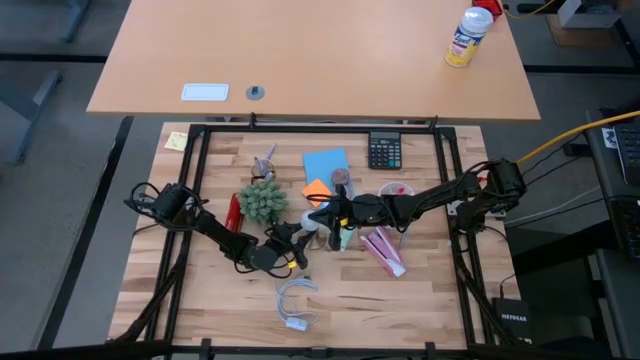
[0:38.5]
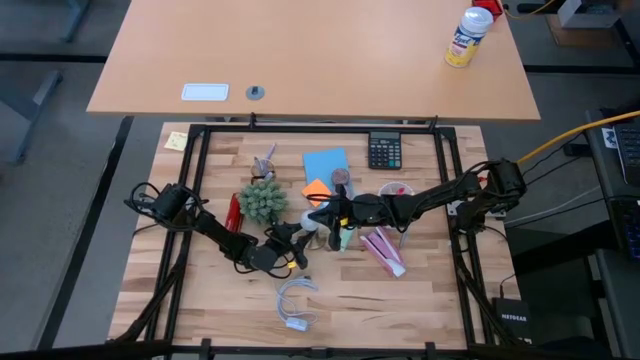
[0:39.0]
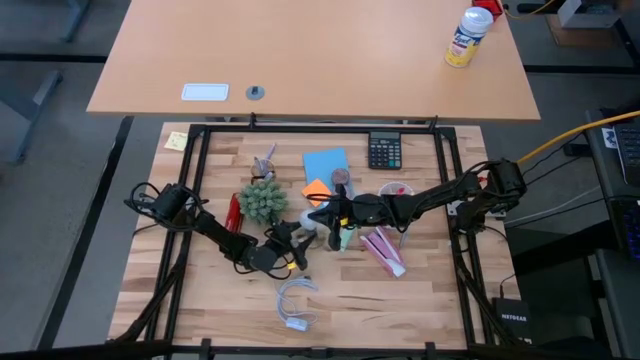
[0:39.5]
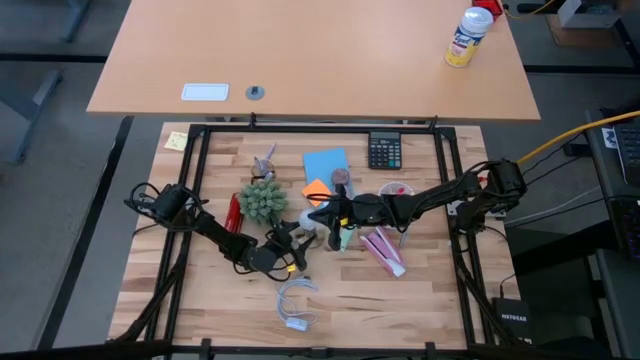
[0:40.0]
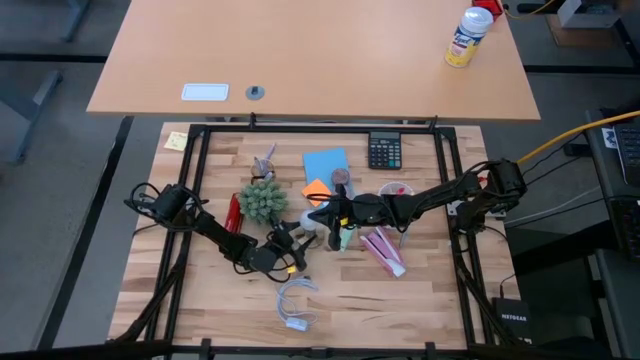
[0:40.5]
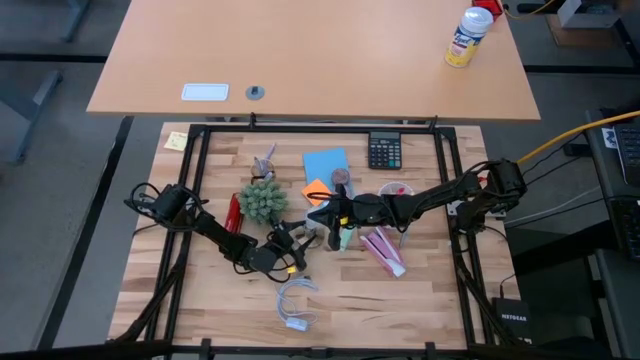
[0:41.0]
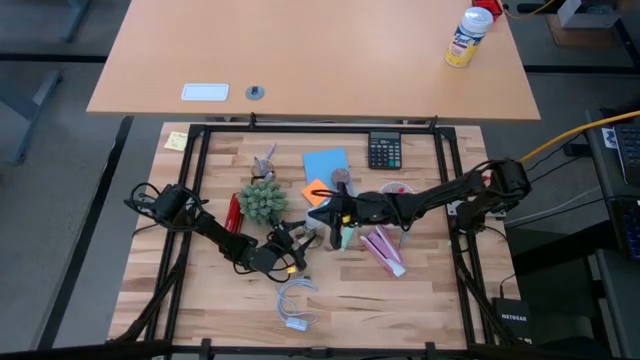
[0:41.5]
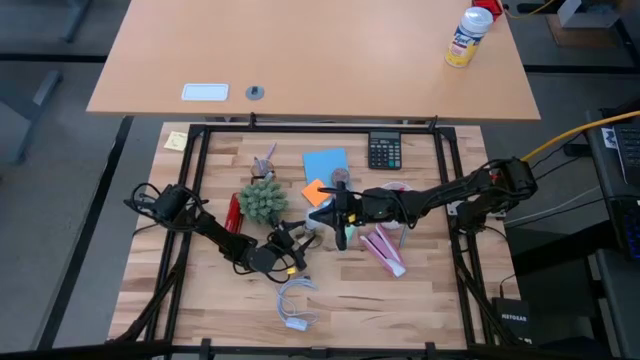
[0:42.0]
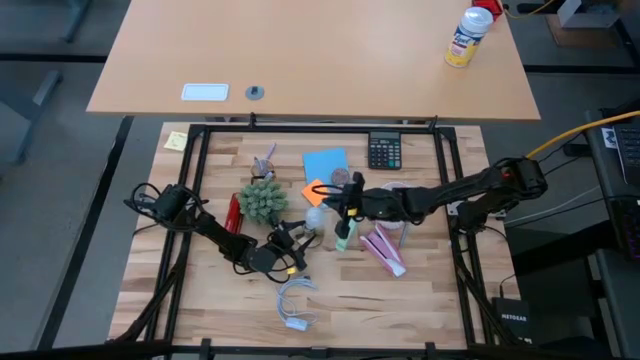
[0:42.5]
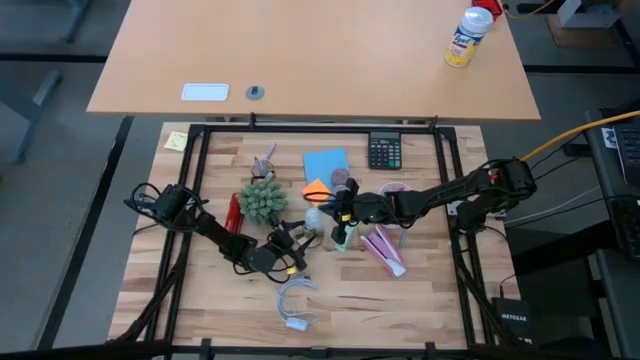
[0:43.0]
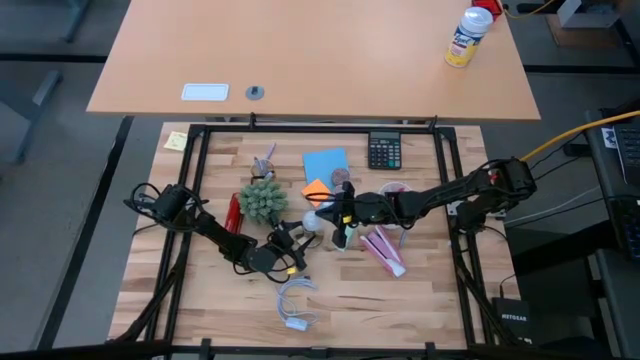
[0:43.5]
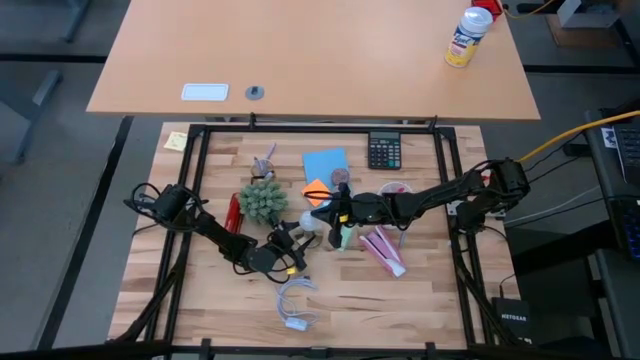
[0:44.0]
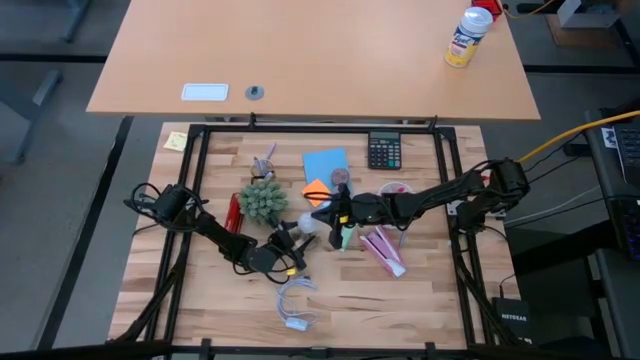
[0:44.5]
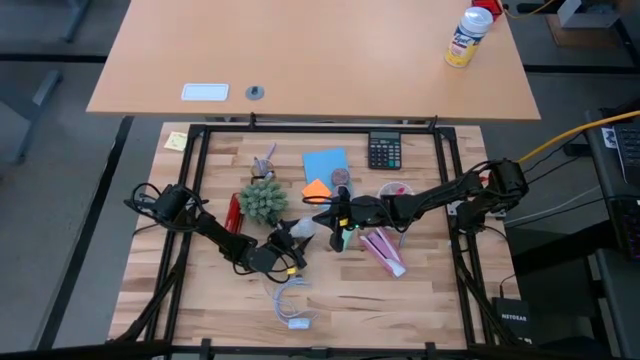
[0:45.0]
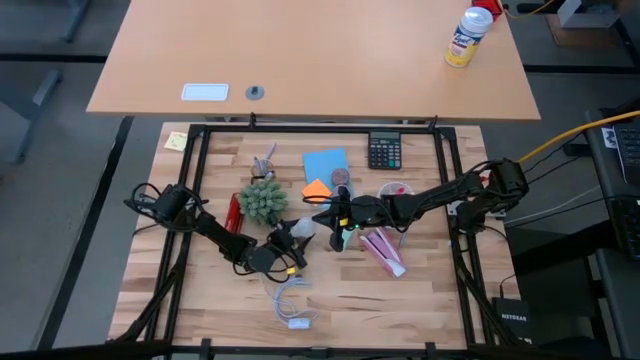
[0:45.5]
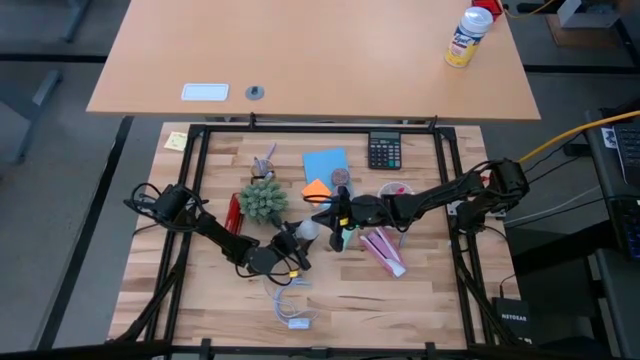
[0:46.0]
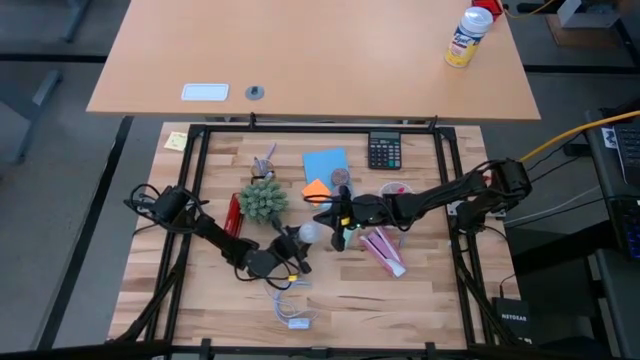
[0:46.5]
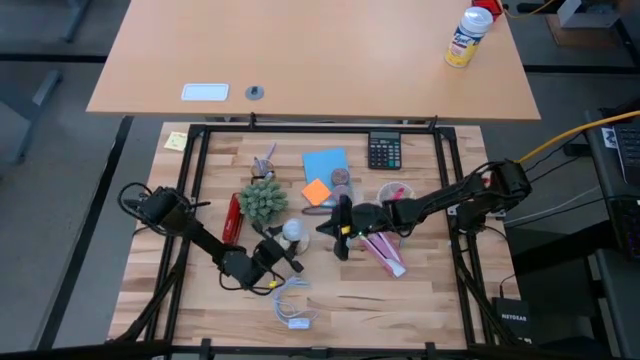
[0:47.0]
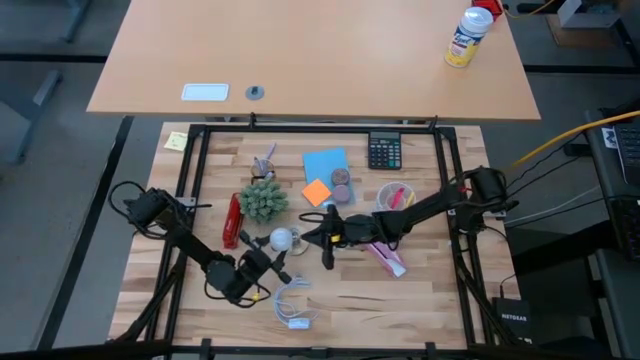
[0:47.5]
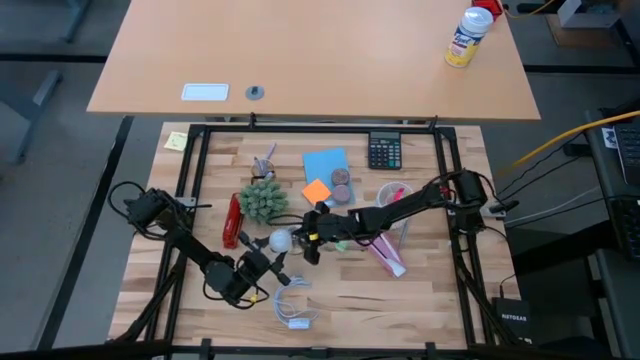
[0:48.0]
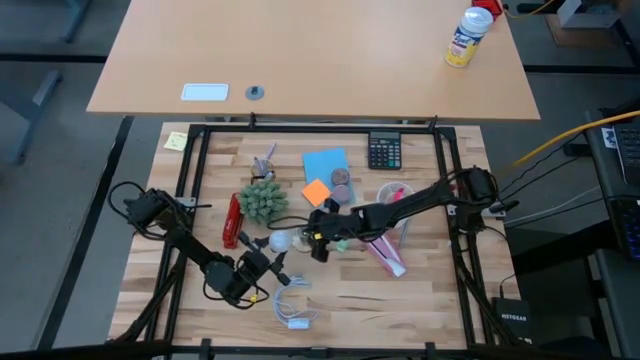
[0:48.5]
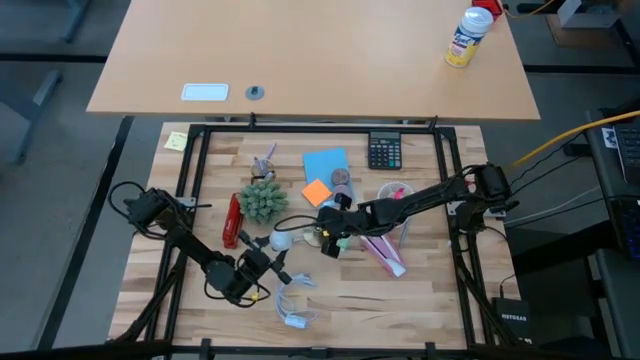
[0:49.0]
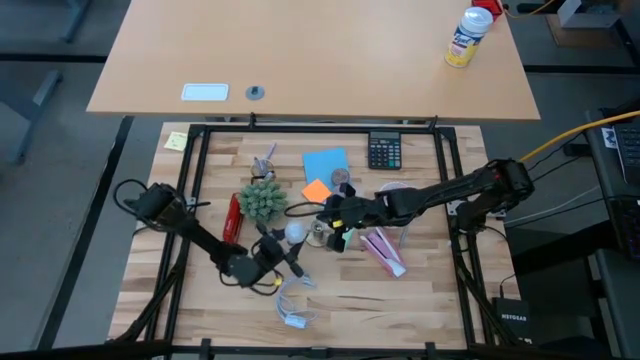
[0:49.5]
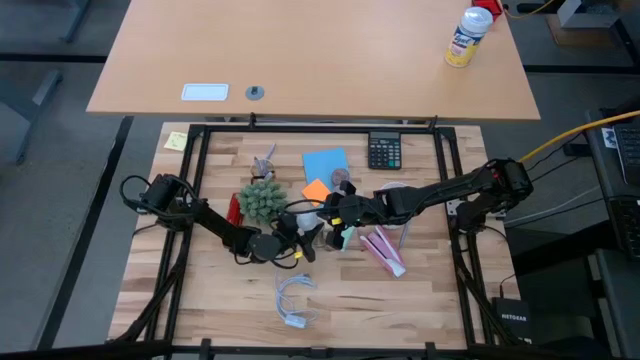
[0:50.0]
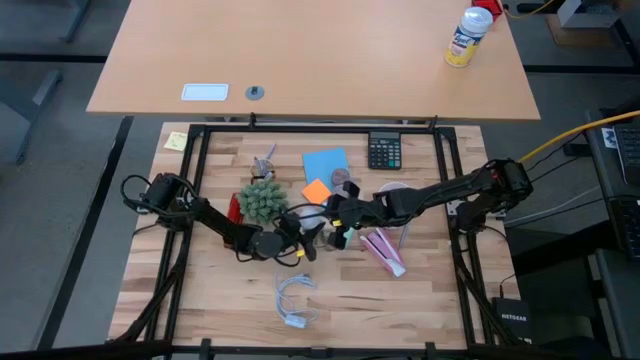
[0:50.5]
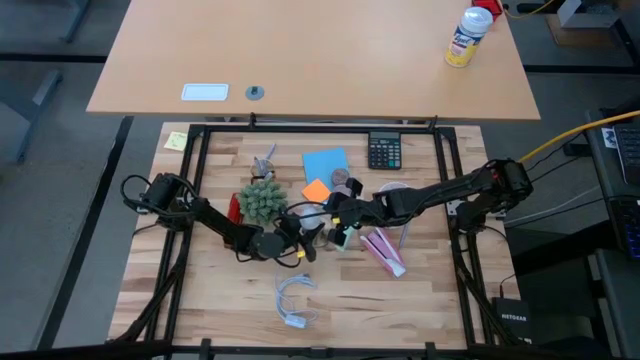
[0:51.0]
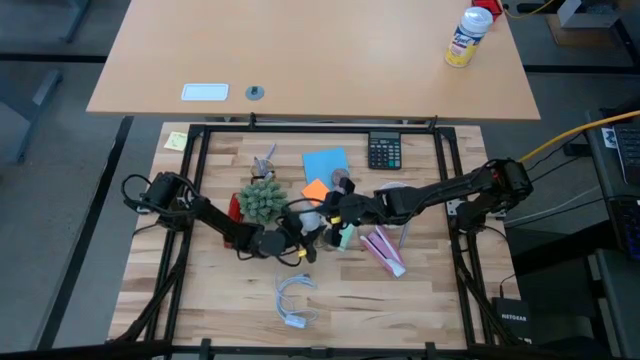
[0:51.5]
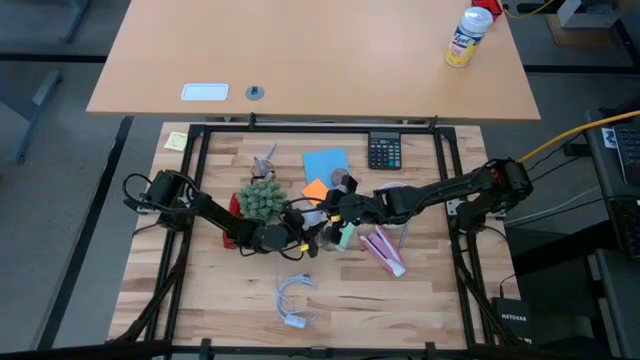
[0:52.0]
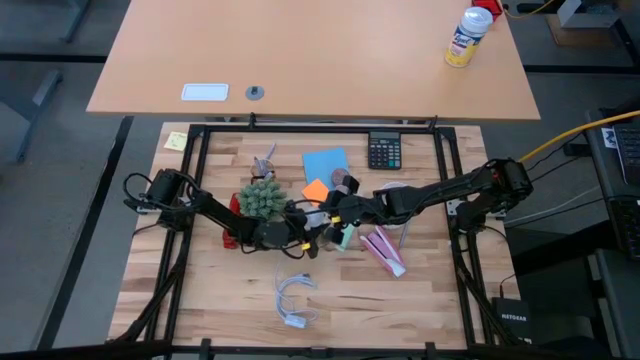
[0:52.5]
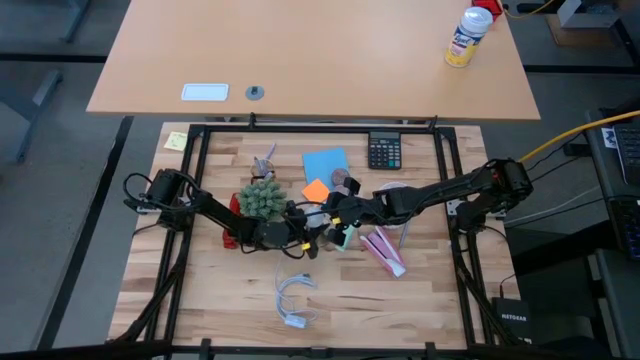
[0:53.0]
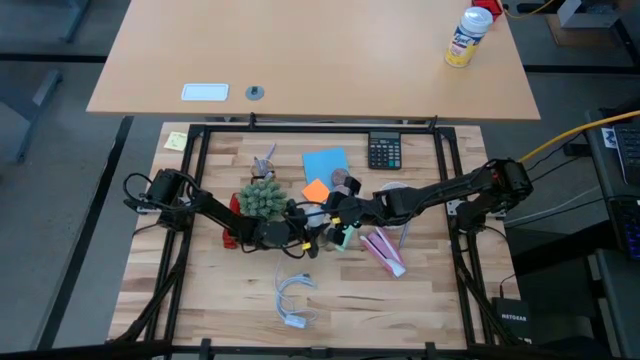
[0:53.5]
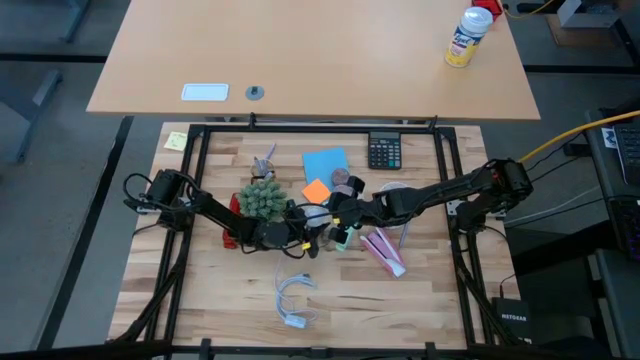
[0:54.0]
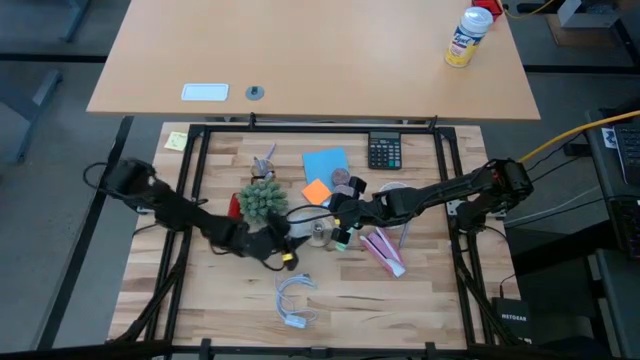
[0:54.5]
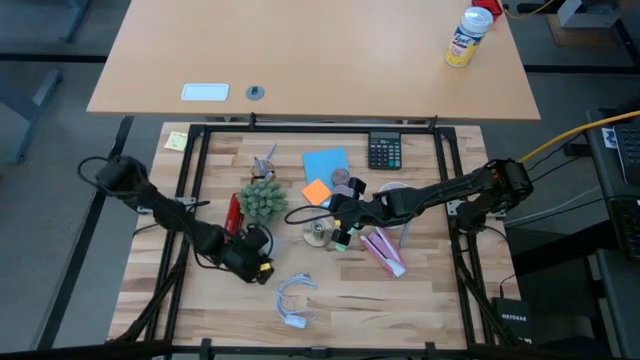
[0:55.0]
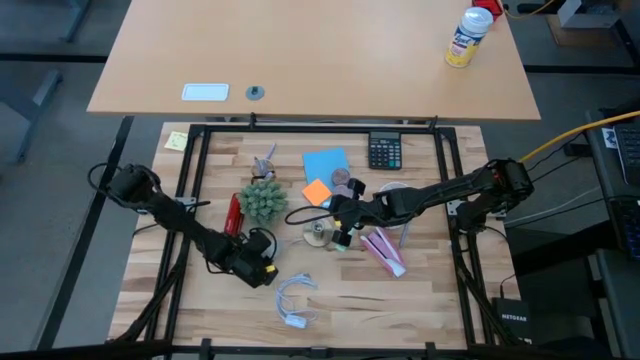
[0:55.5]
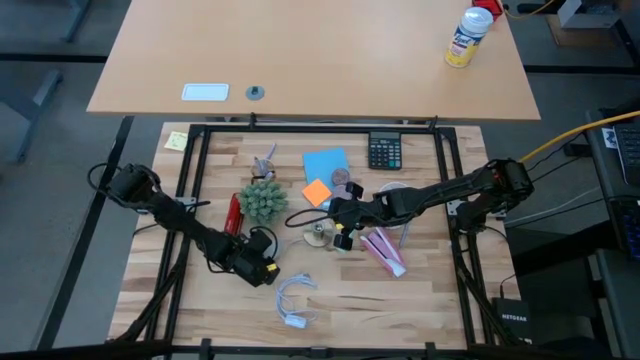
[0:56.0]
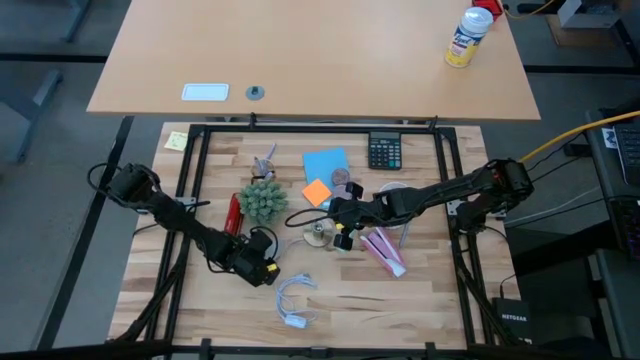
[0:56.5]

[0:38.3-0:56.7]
Task: Screw lightbulb
Insert the white lightbulb into the lamp socket

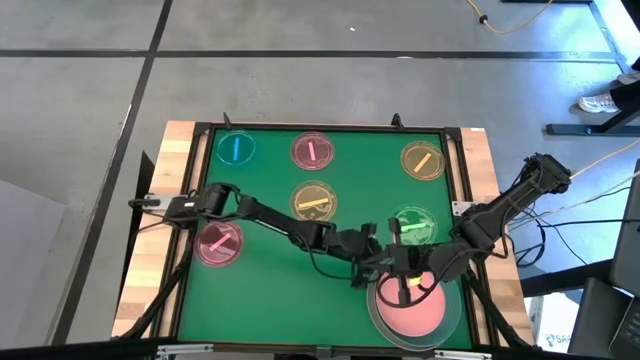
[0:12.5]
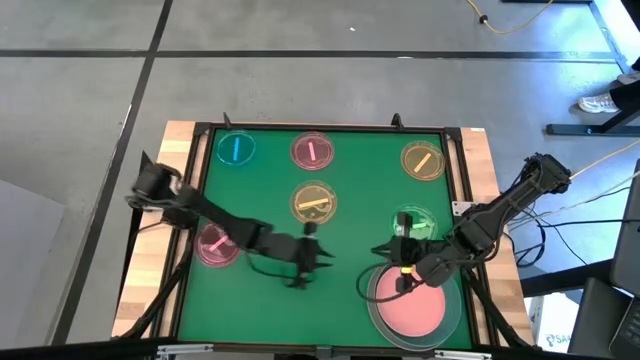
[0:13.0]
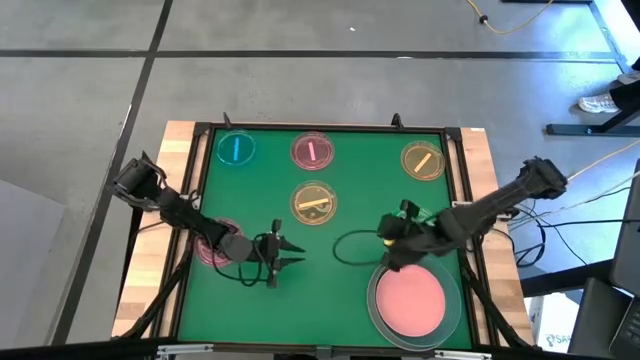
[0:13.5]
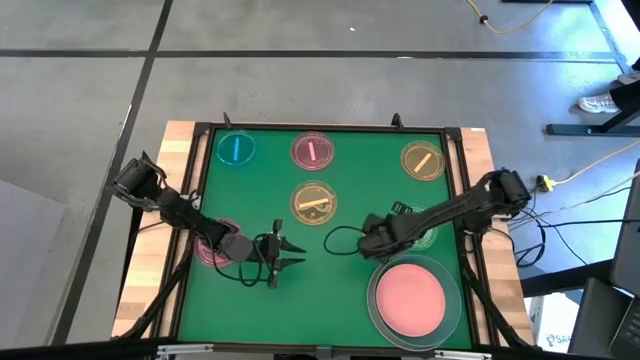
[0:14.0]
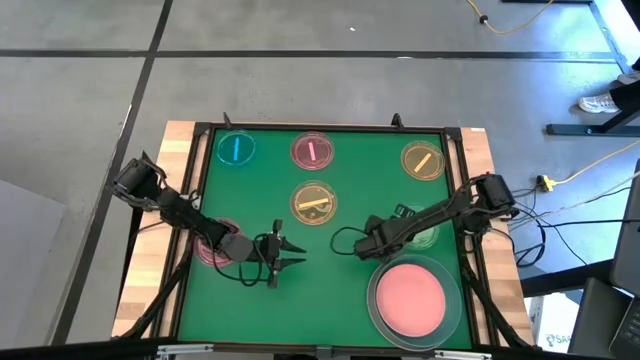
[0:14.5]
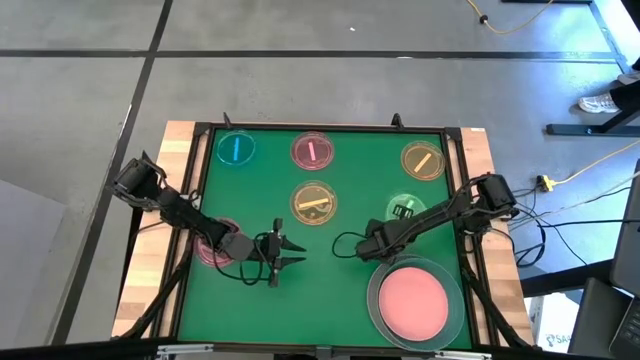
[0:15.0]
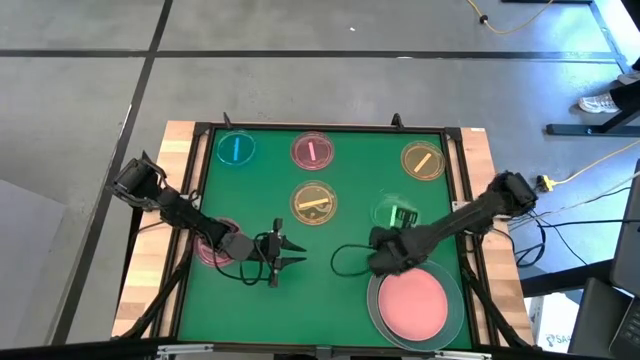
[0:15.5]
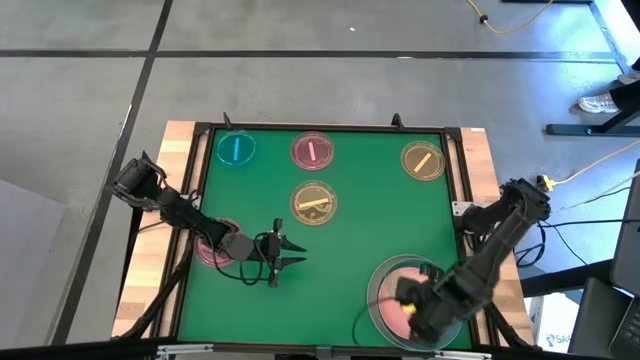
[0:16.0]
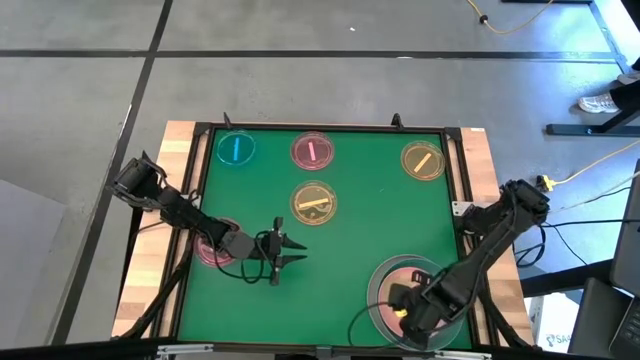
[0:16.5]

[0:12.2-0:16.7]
Task: Stack plastic plates
Stack the transparent green plate on top of the light orange plate
